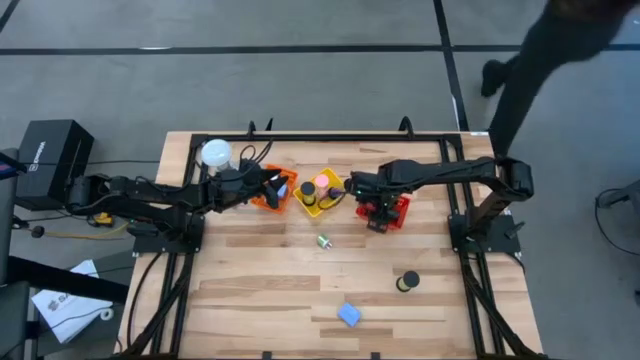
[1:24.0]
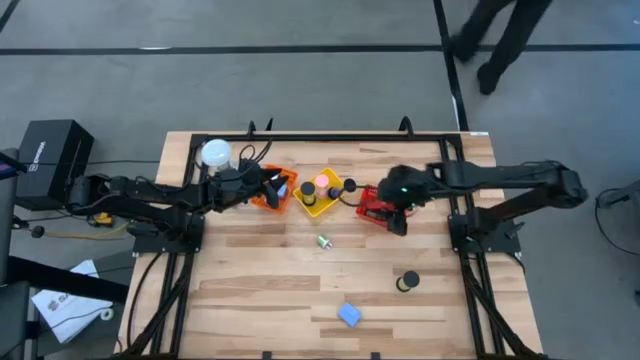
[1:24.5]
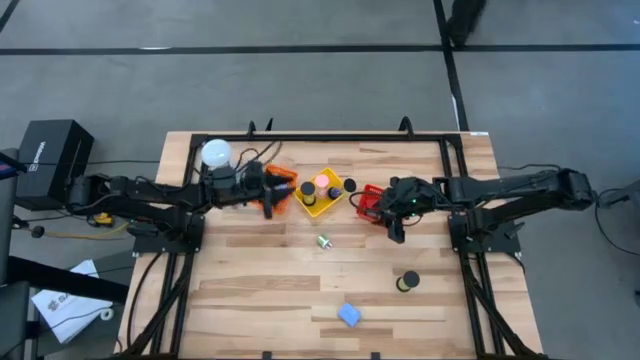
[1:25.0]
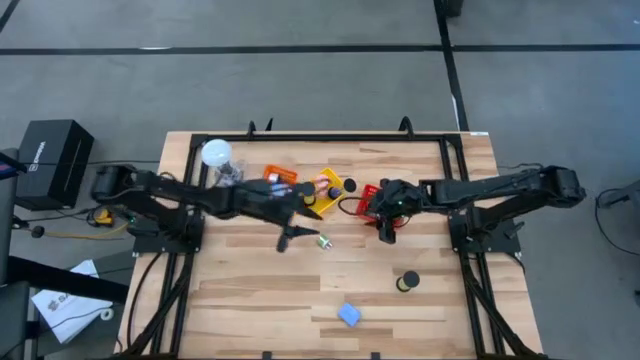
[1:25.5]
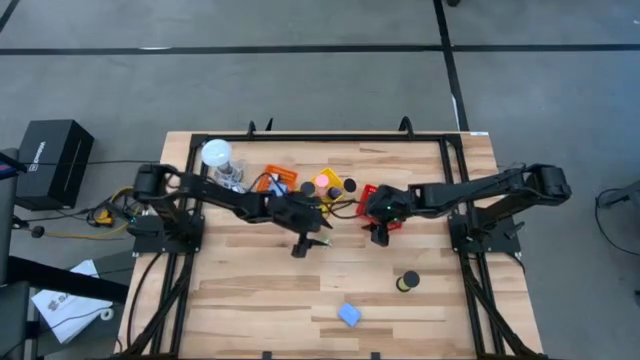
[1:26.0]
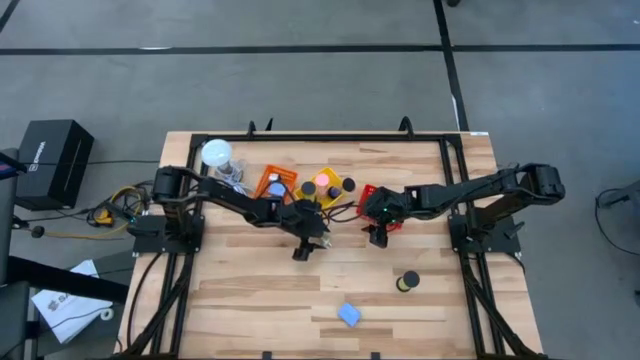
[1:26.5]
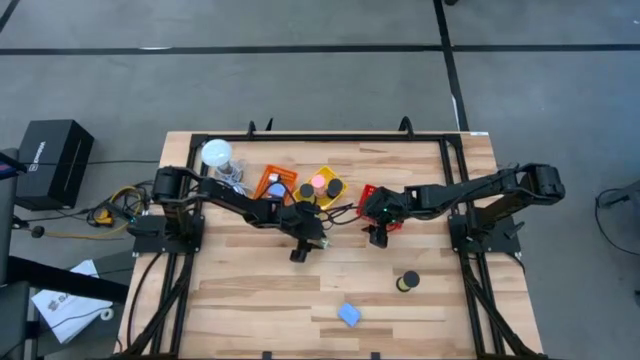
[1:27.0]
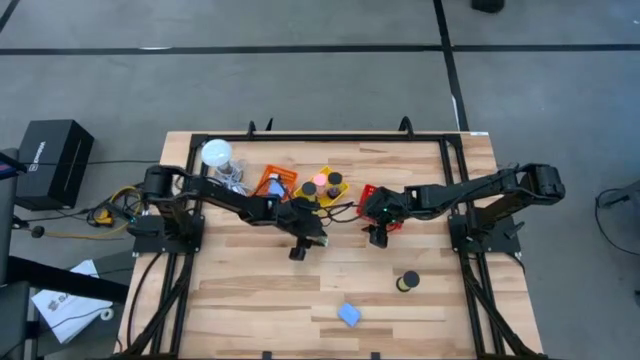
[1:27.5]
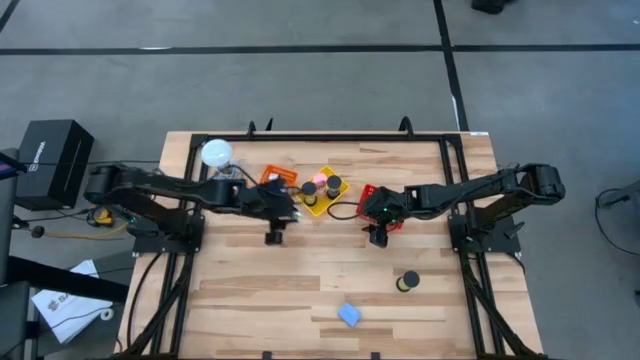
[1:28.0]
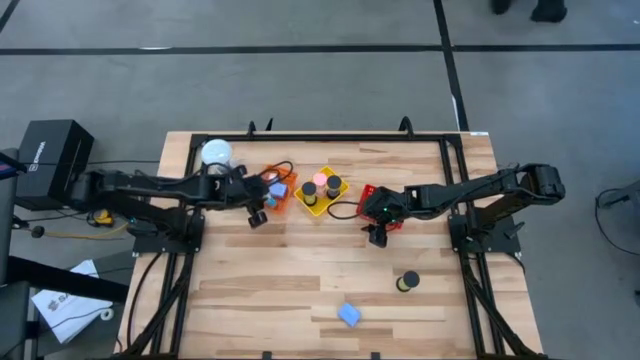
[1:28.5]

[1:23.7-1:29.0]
Task: Pick & Place Office items
Put the green charger adapter into the orange bin

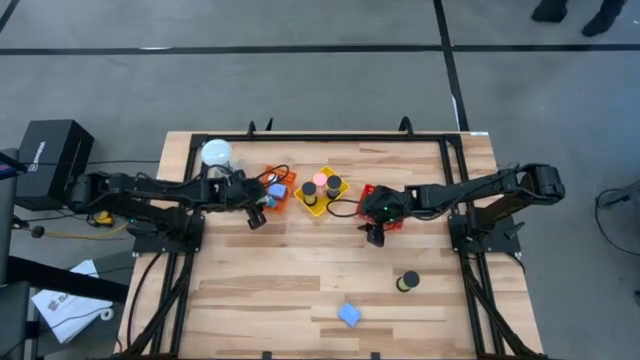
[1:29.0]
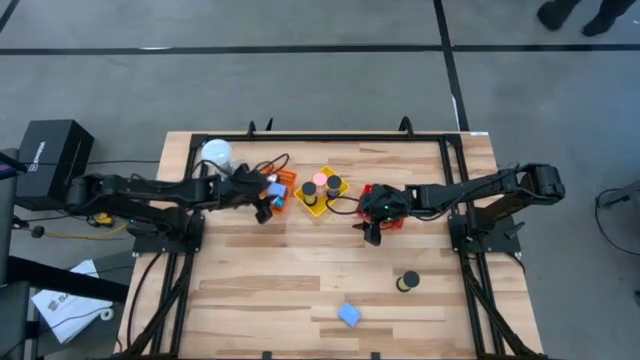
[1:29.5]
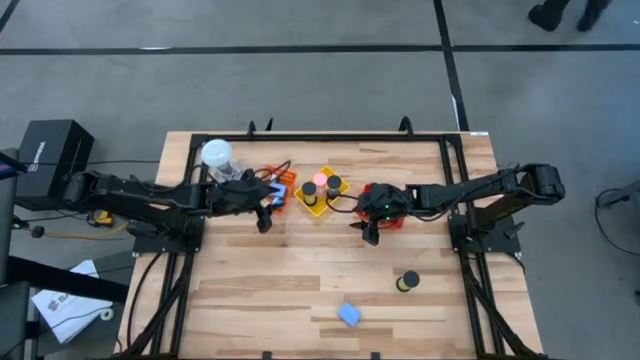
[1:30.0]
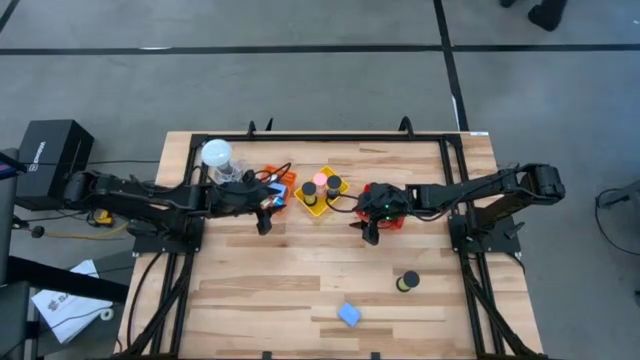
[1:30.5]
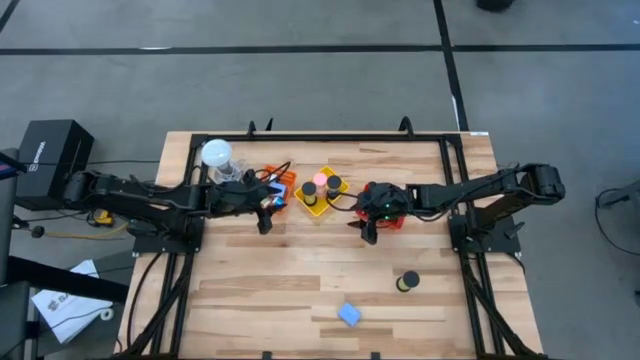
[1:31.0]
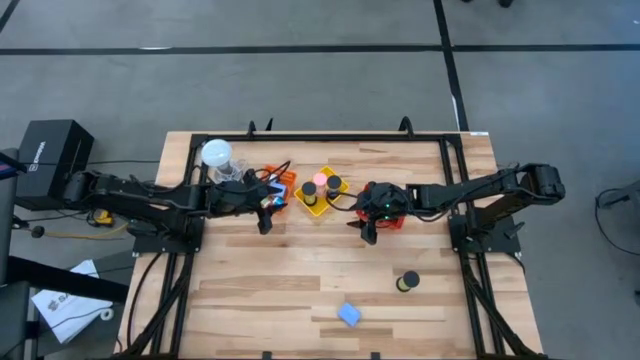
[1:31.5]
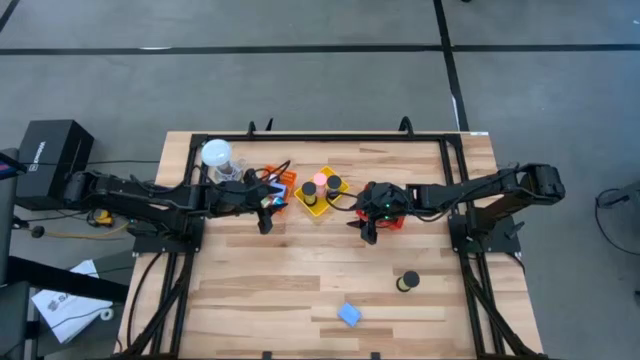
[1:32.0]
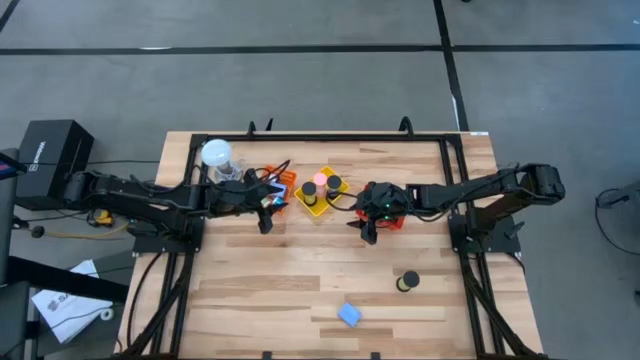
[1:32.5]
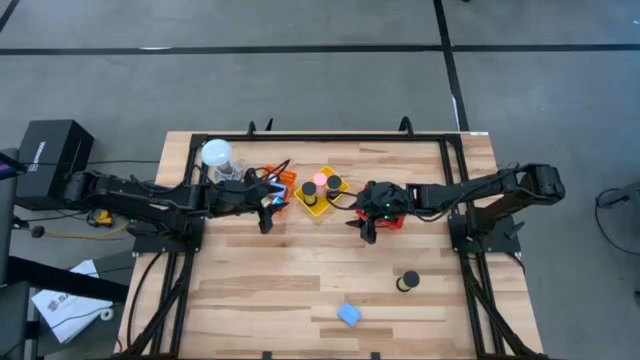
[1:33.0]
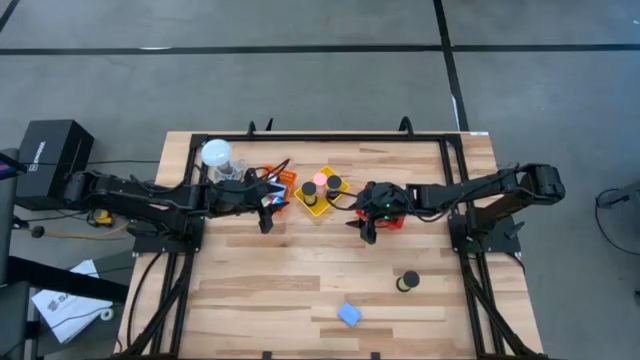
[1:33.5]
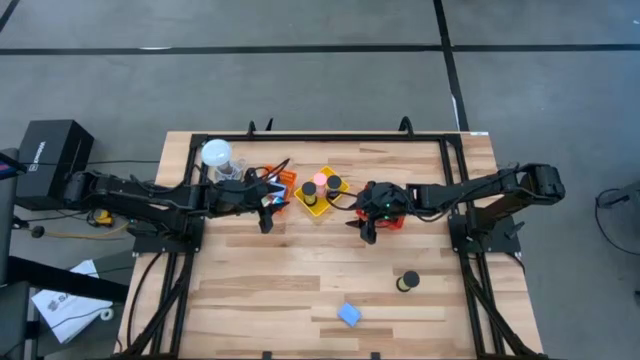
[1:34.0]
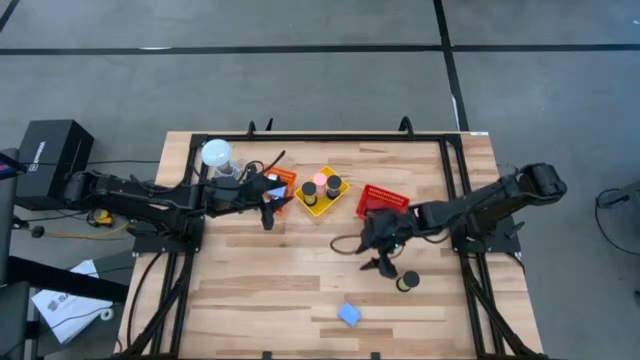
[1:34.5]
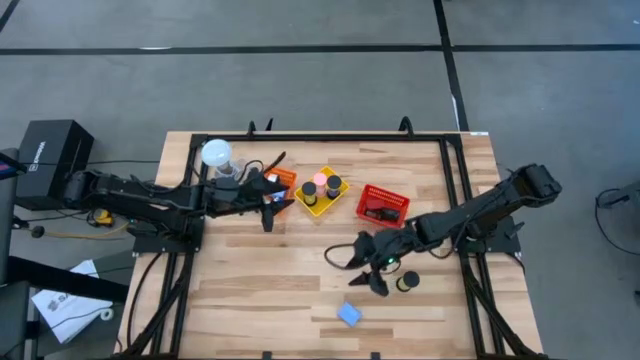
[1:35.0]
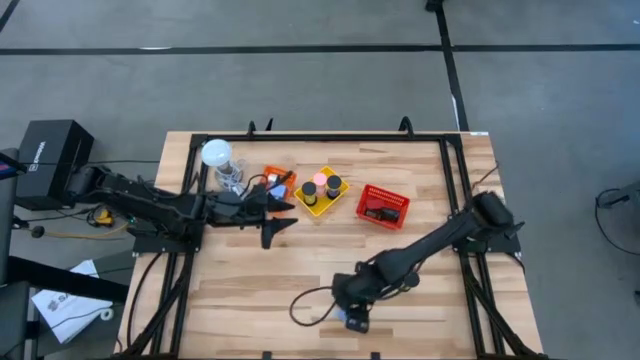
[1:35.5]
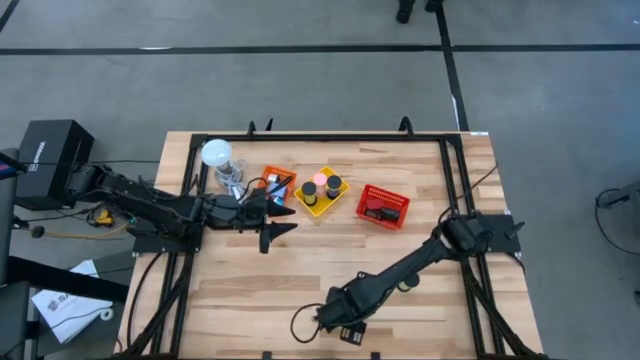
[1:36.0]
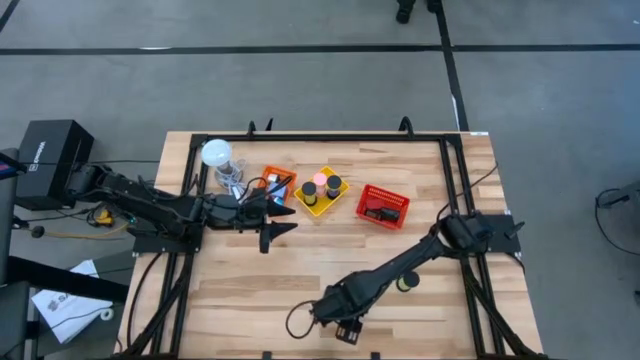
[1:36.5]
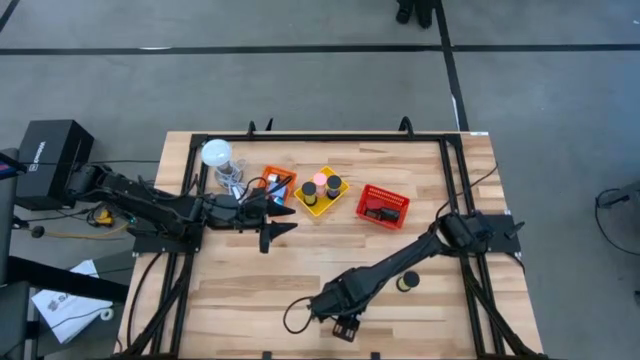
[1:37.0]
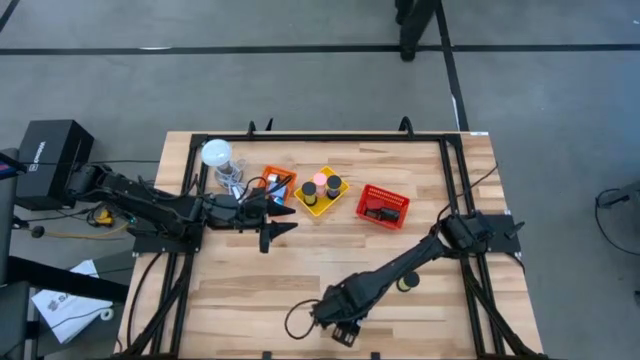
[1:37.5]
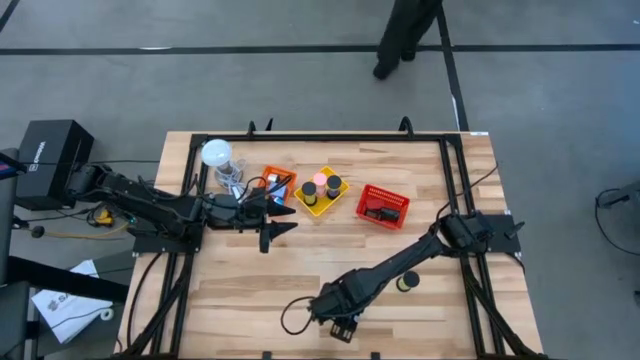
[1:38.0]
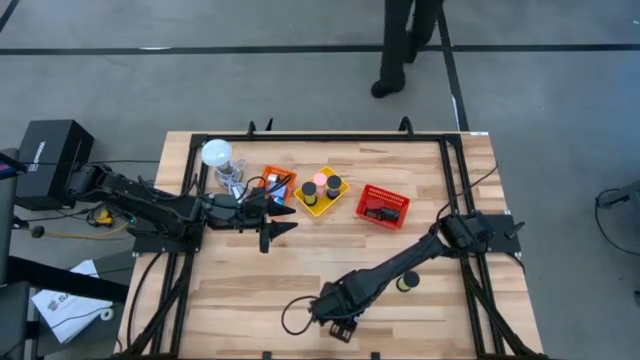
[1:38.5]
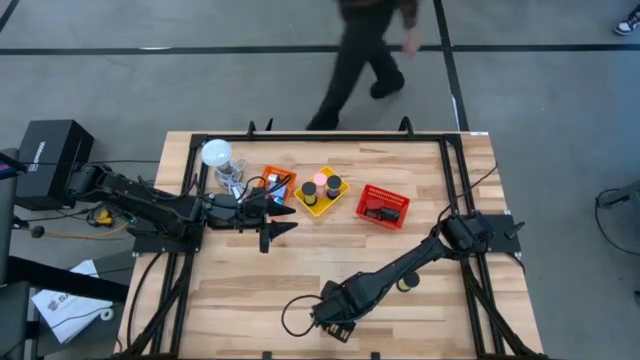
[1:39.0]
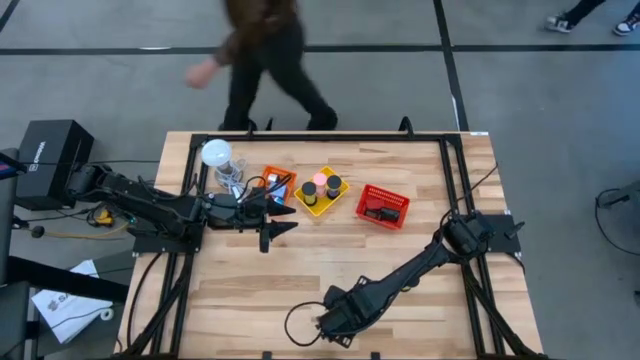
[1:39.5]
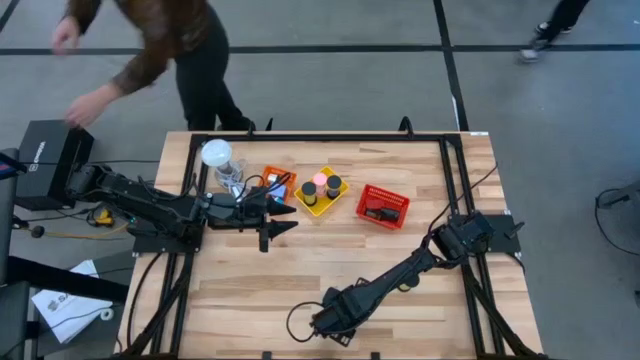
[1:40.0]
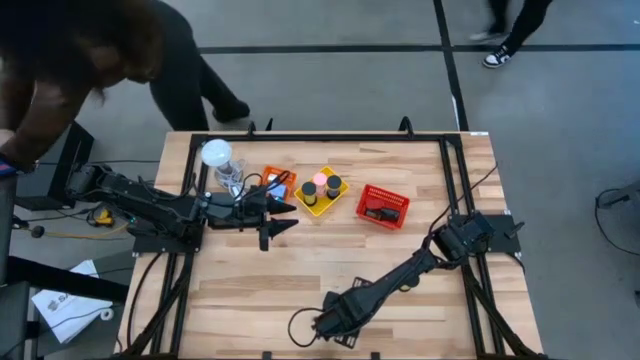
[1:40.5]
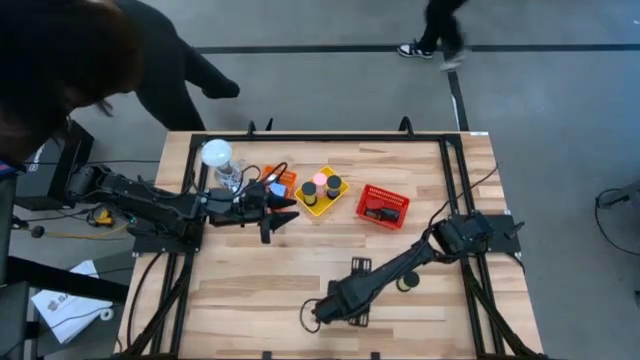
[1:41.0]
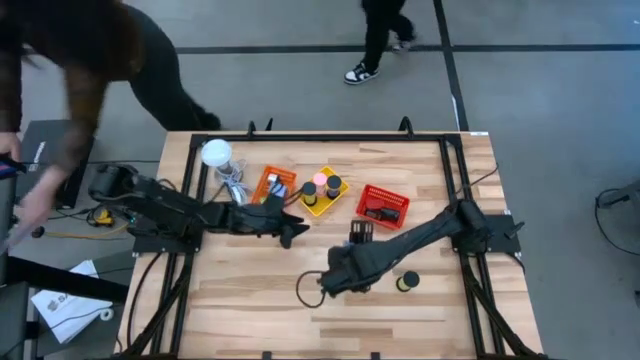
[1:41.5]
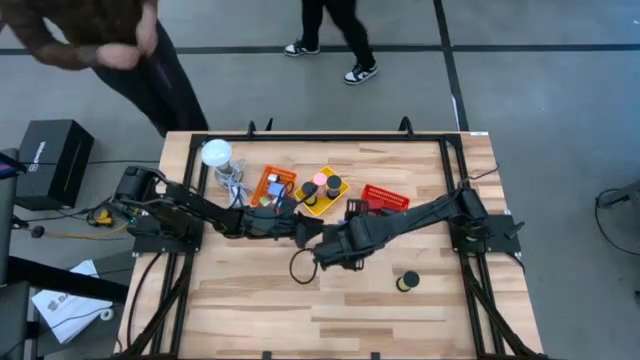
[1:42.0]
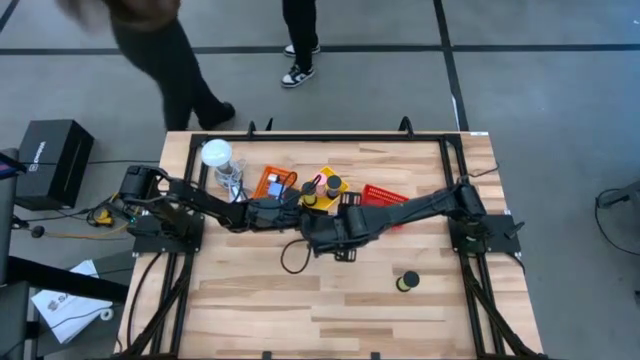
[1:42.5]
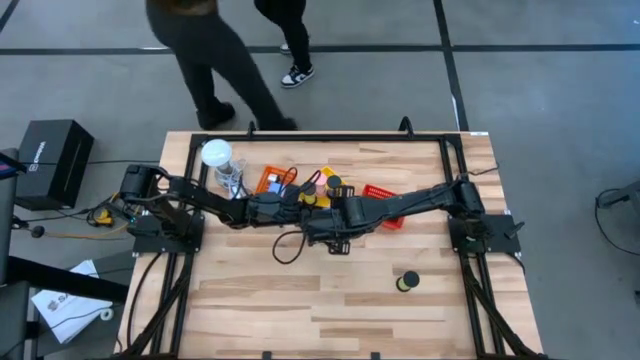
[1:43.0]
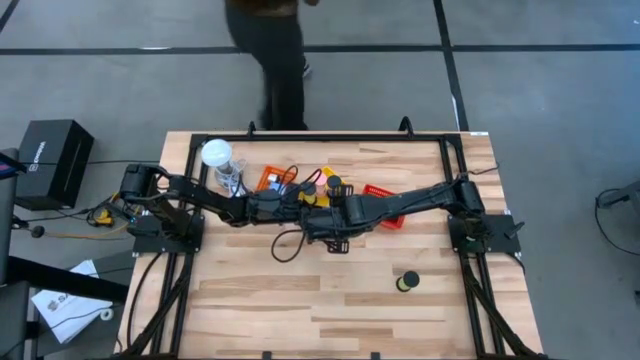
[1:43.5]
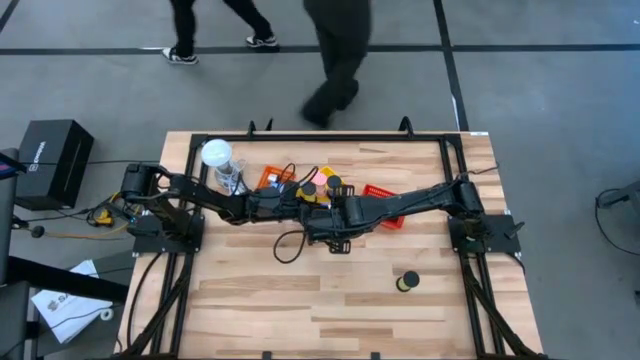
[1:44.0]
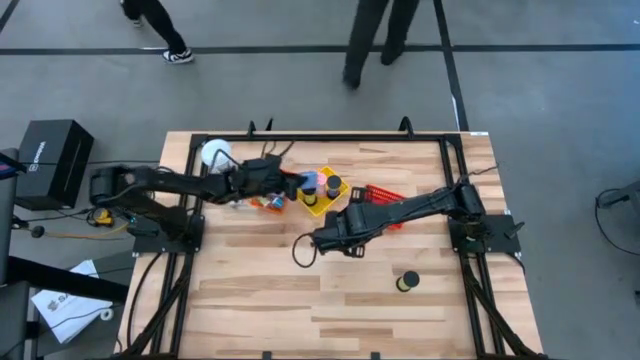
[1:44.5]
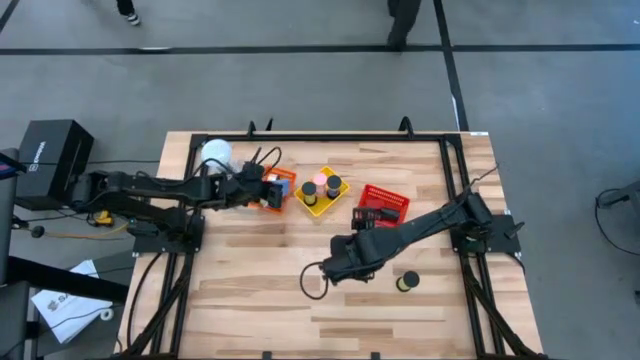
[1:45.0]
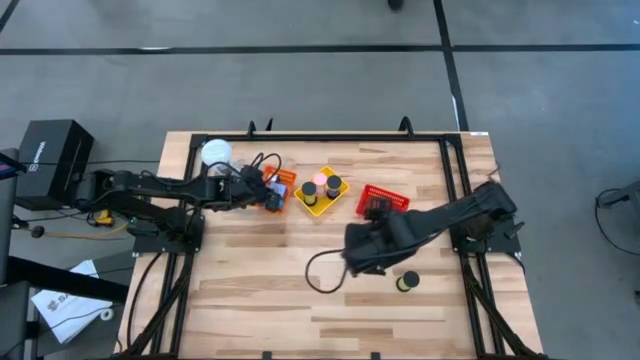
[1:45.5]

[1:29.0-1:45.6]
Put the blue charger adapter in the orange bin
